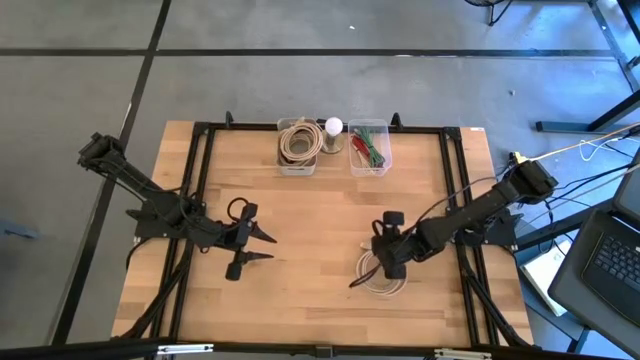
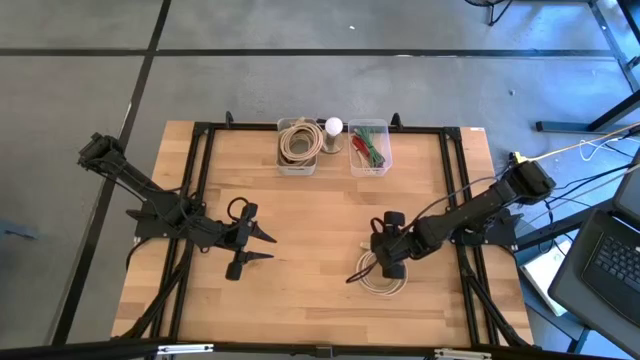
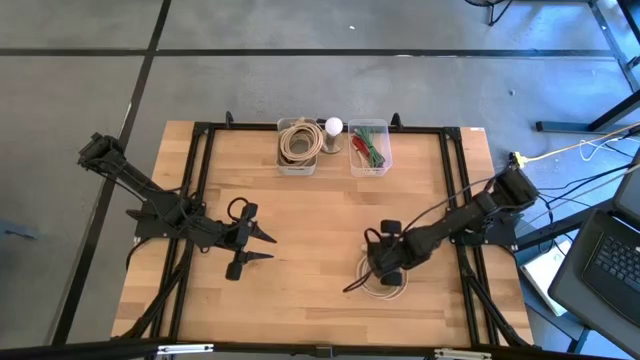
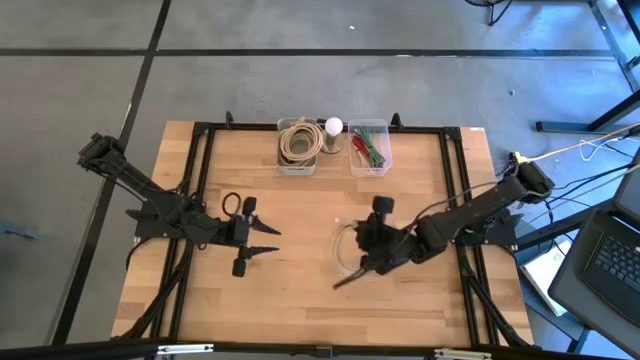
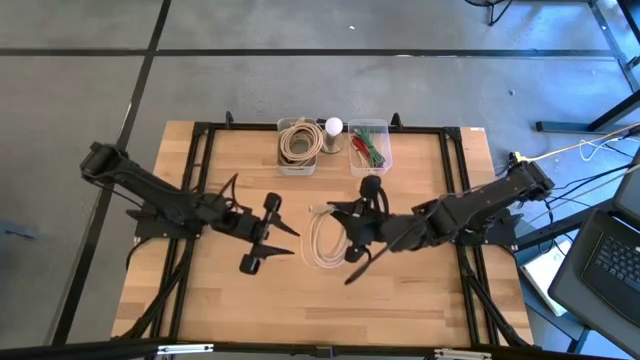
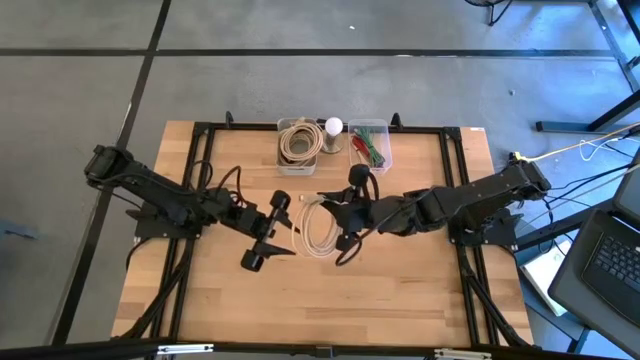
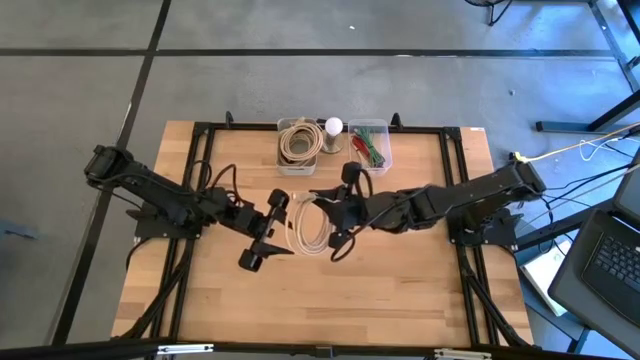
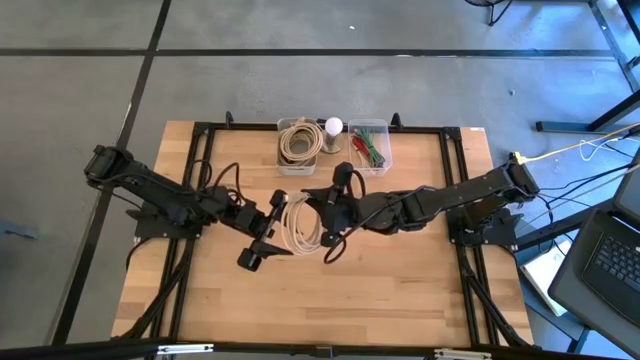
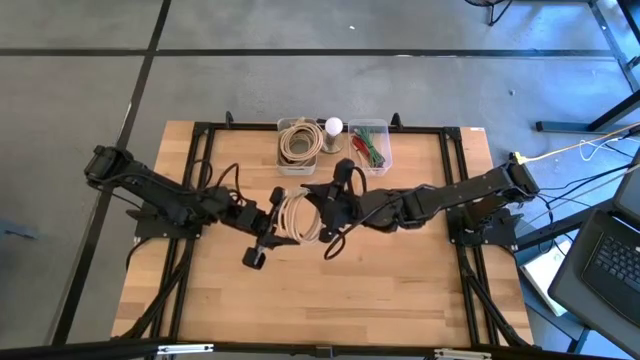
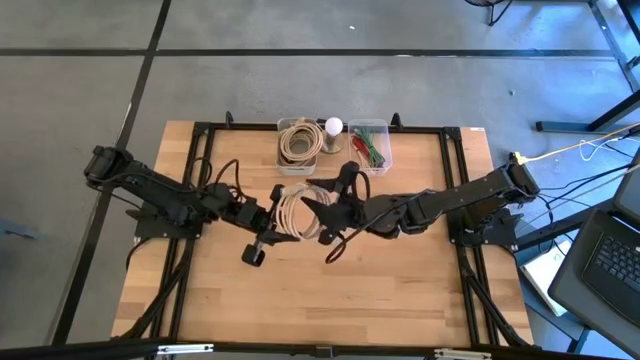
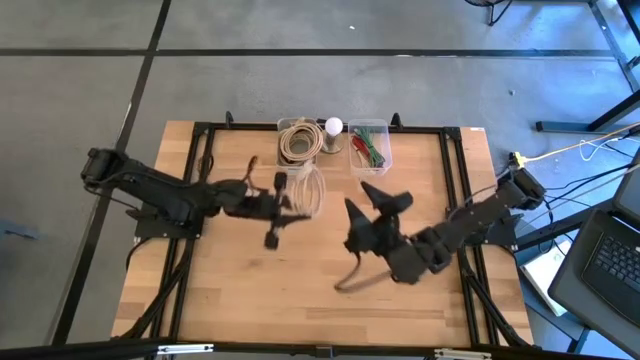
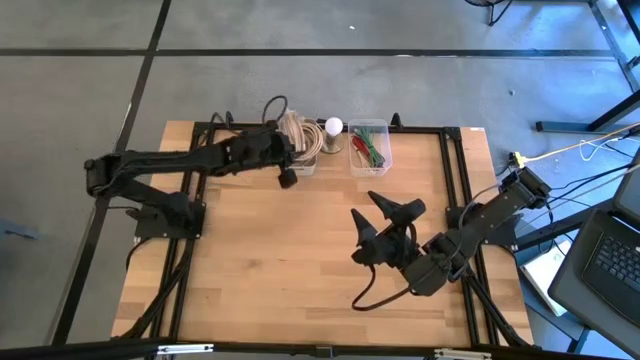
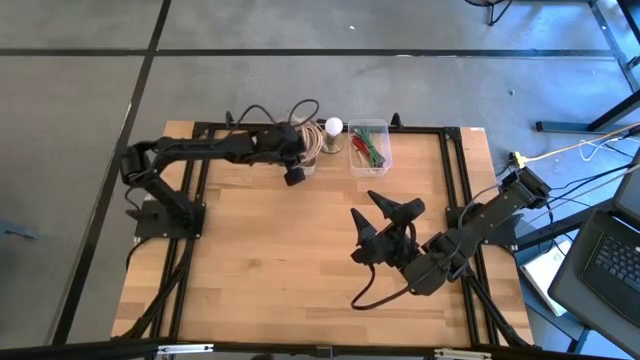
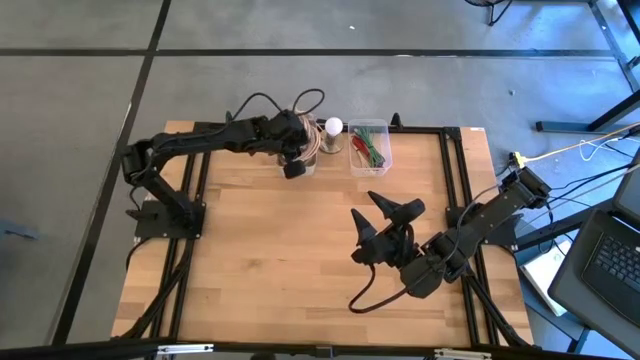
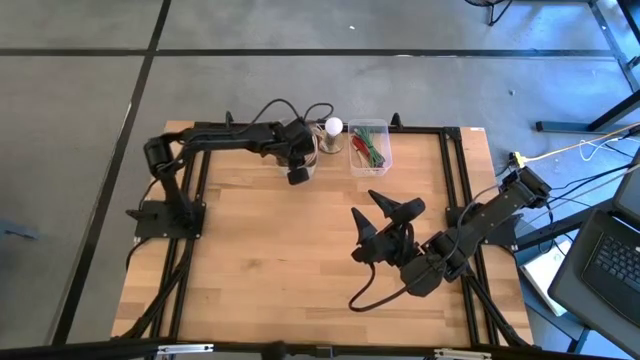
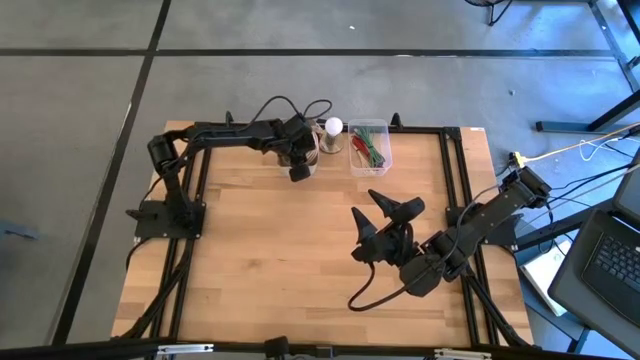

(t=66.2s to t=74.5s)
Put the light brown HDMI cable into the gray bin

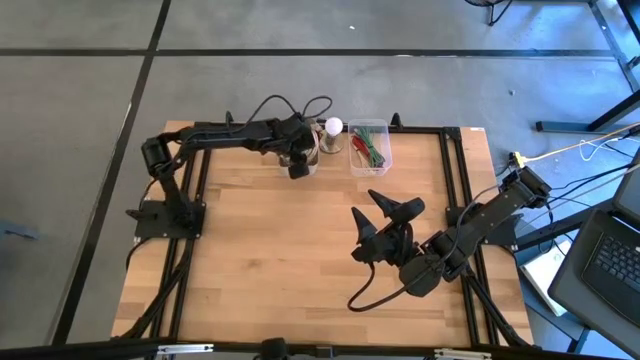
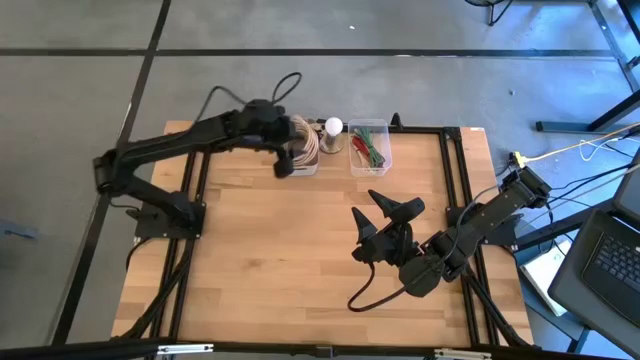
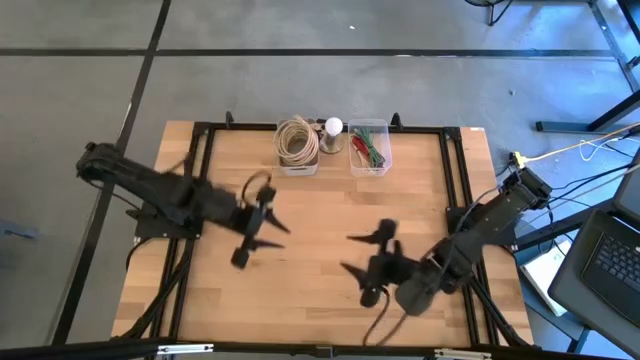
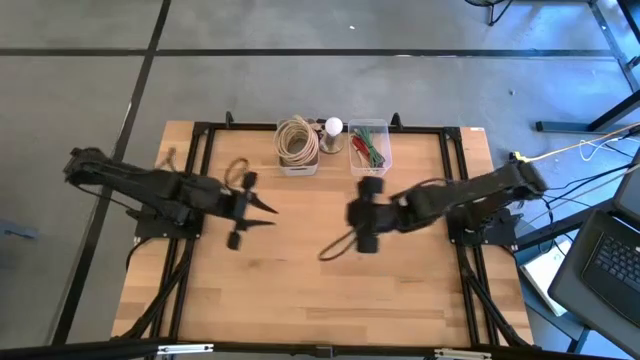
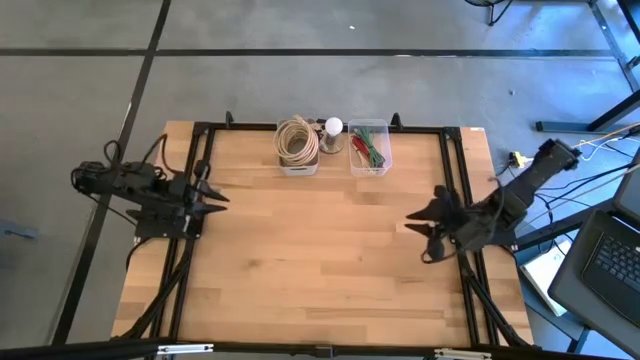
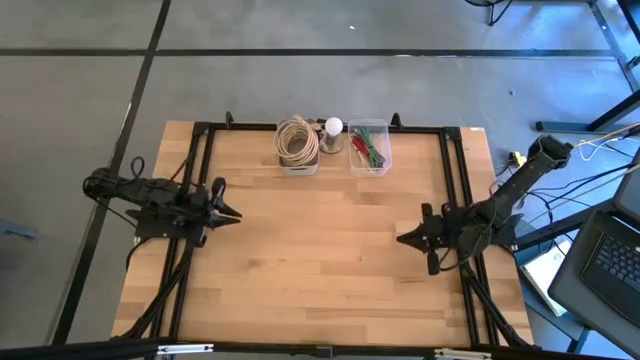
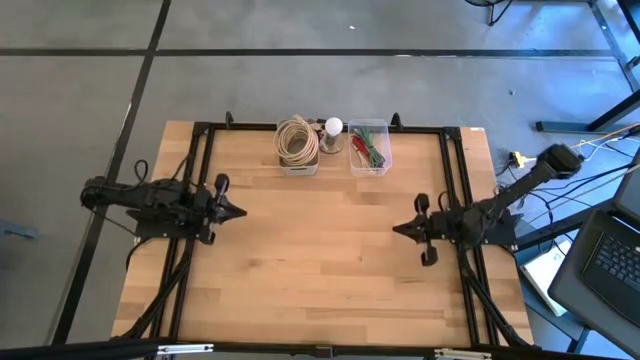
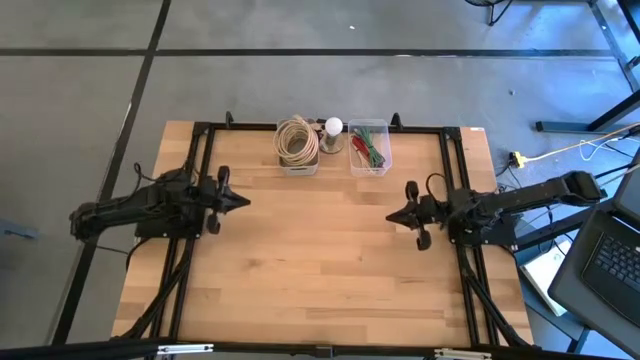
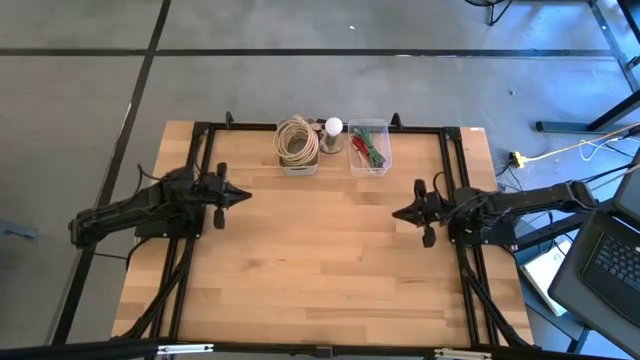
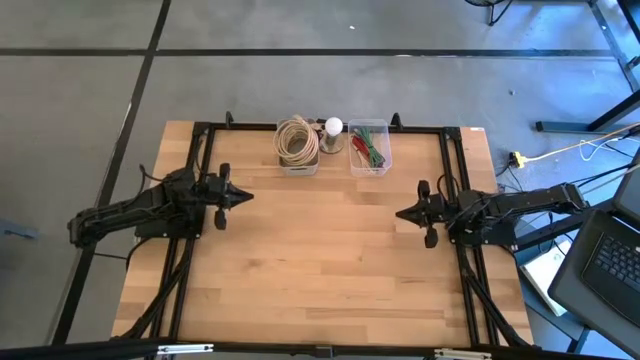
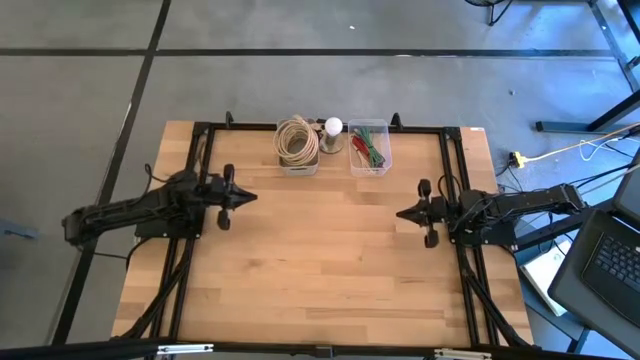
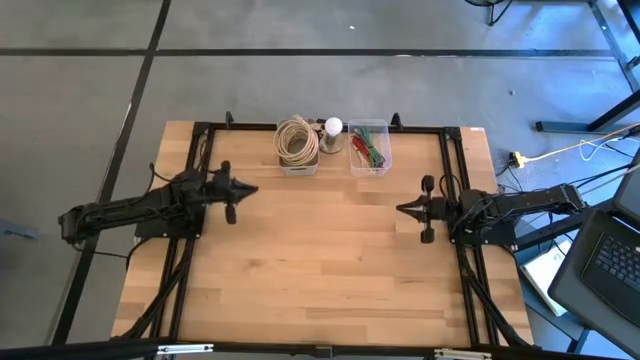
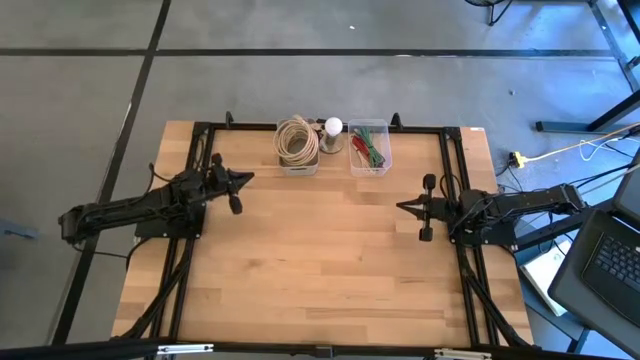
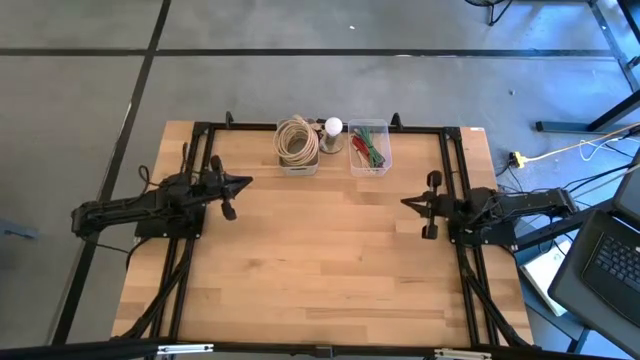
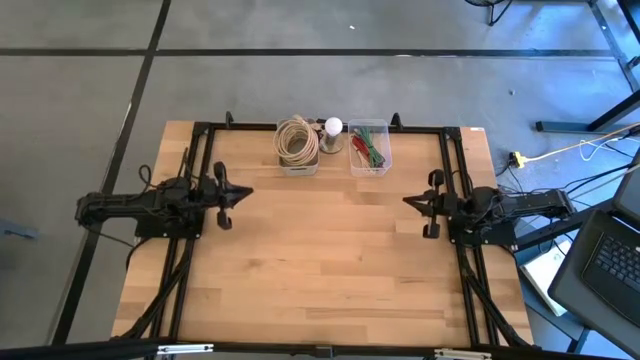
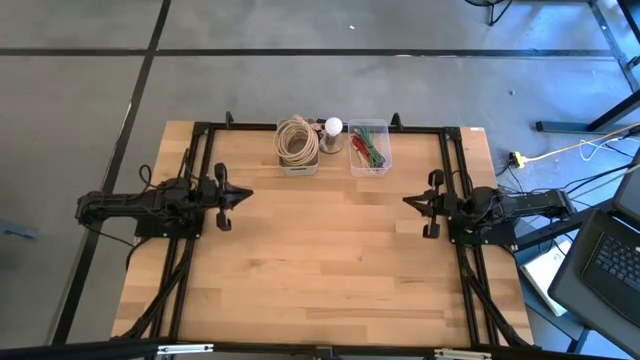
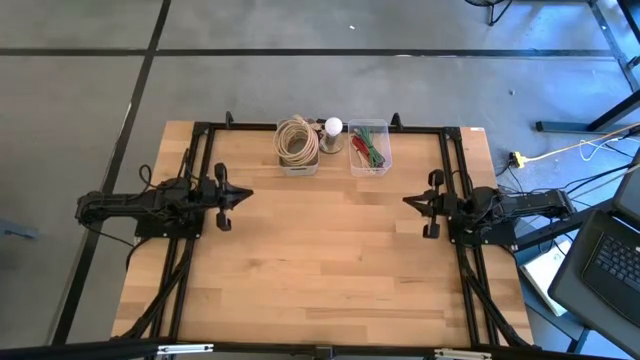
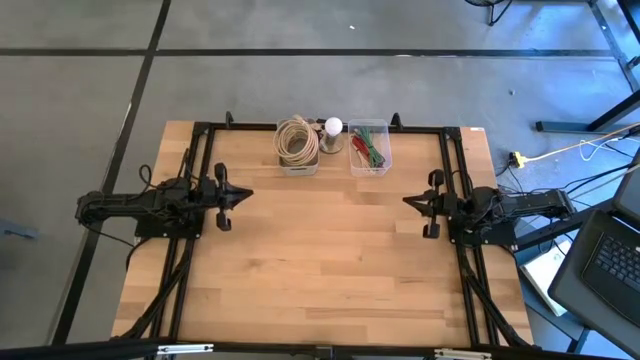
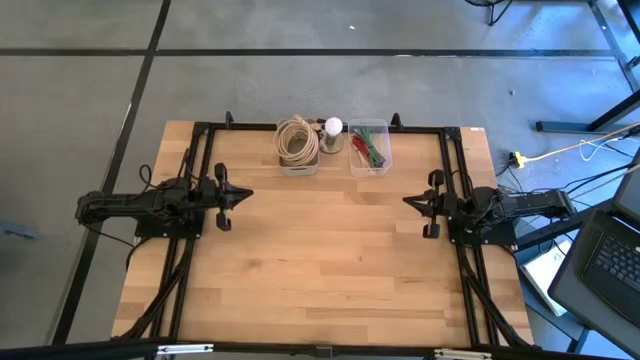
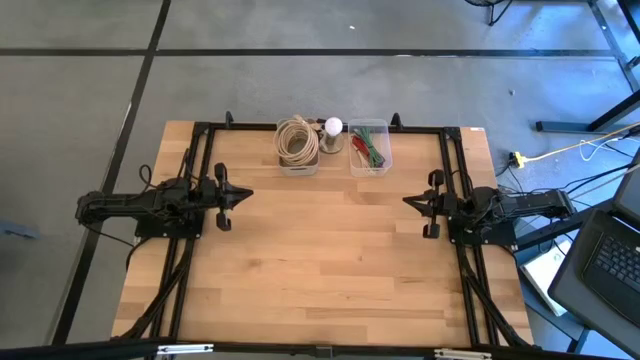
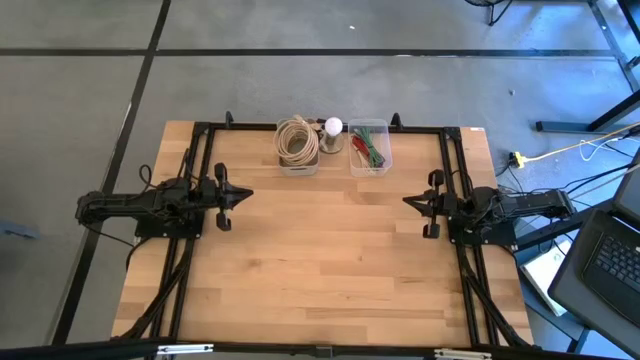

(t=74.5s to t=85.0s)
Return to Home Position
